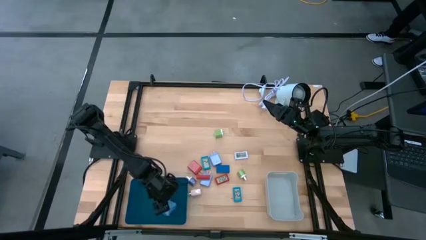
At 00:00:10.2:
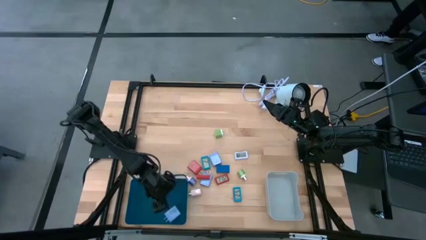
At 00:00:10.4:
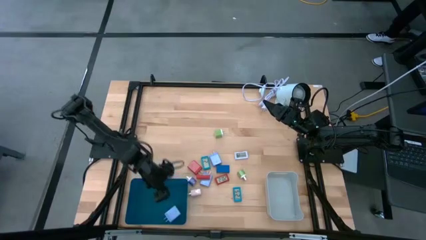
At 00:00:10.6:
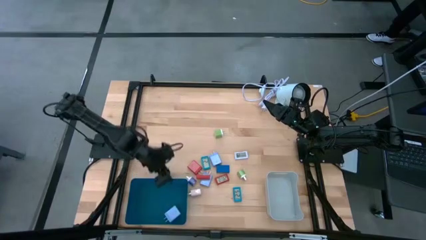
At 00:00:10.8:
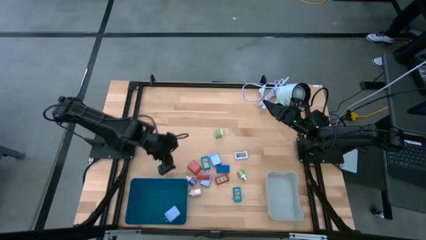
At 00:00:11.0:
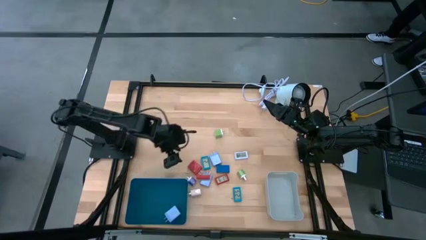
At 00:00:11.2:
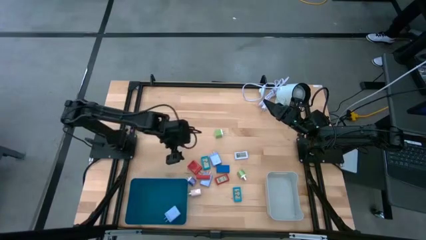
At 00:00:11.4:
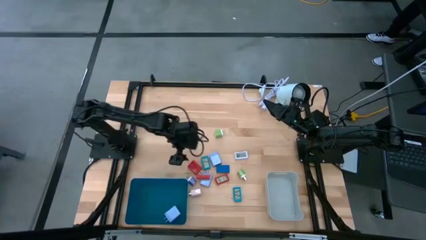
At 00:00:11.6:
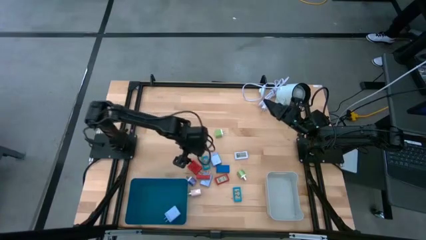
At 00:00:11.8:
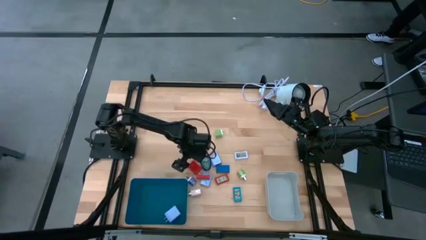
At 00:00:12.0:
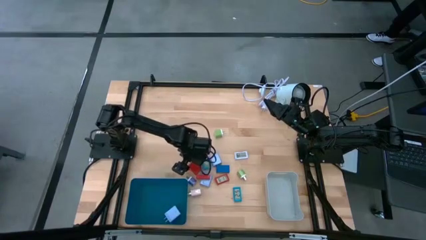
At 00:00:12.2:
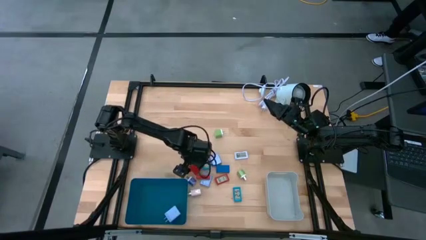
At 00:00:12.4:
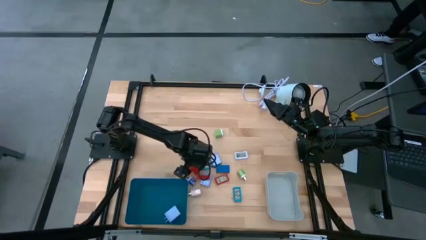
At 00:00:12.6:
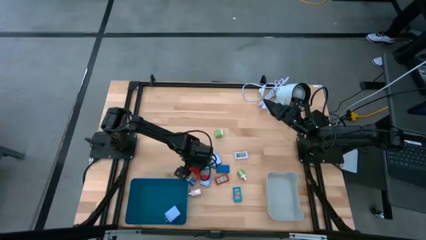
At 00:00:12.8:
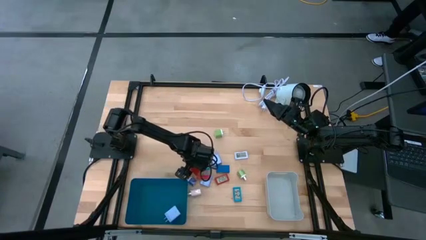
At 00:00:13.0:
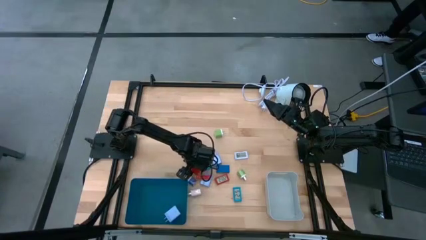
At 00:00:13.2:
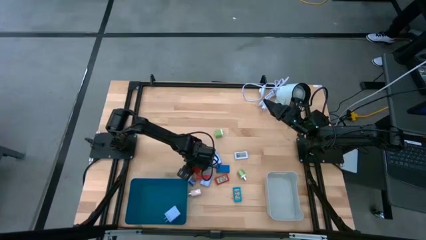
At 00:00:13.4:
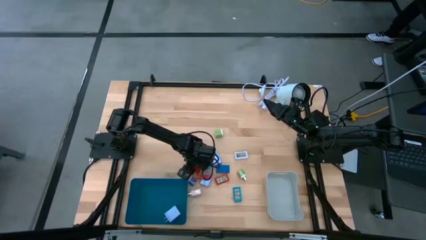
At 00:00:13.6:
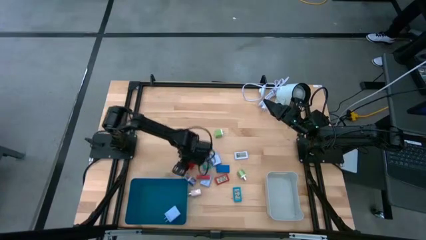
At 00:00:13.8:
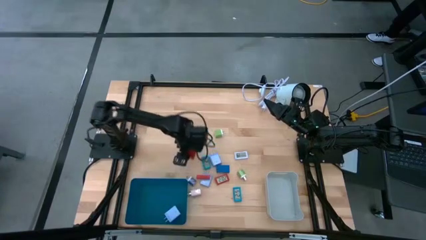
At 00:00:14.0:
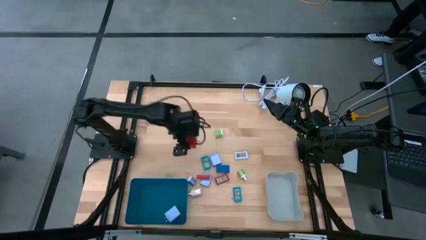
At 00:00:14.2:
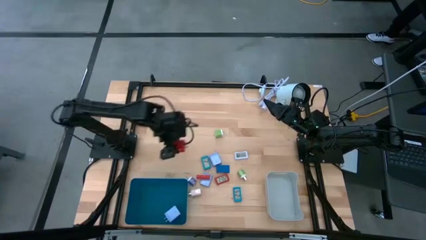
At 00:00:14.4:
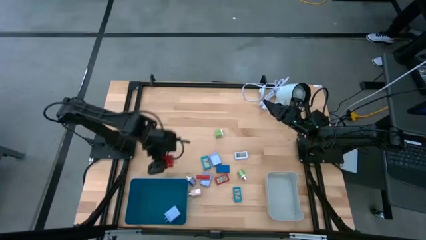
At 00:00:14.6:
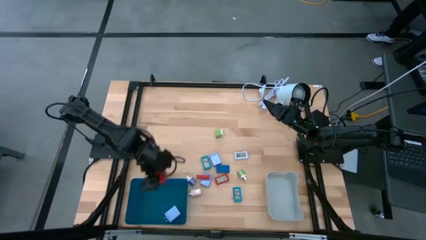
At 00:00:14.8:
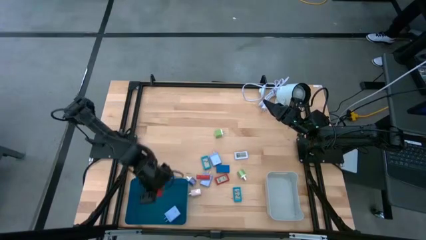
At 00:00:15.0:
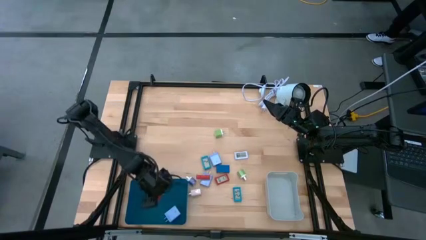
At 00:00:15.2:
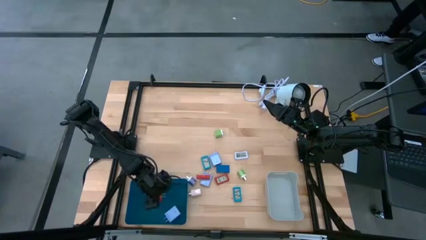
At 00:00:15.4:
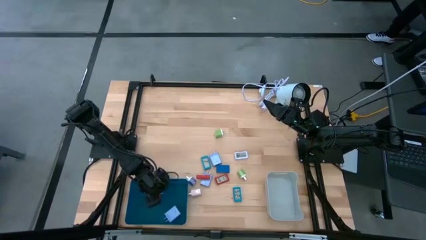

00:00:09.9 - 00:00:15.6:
Task: Pick & Place Office items
Put the red charger adapter into the blue bin

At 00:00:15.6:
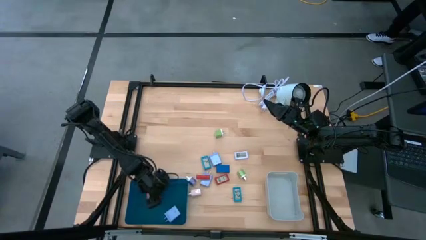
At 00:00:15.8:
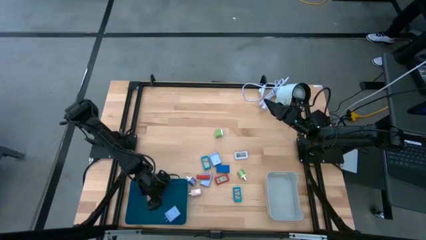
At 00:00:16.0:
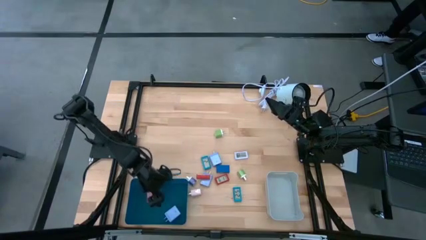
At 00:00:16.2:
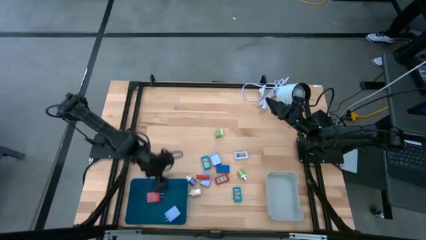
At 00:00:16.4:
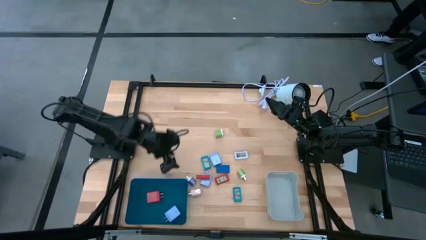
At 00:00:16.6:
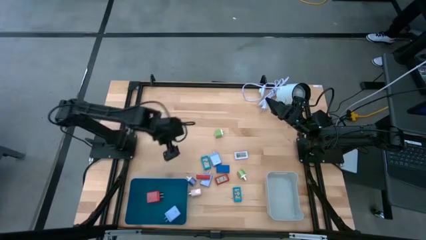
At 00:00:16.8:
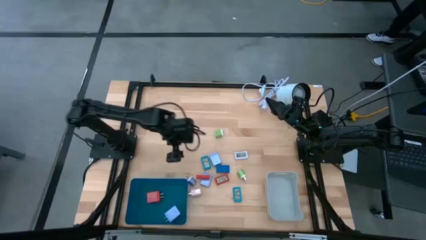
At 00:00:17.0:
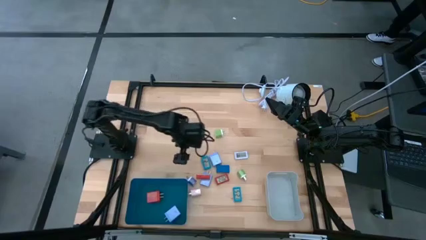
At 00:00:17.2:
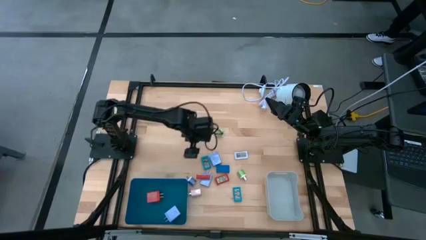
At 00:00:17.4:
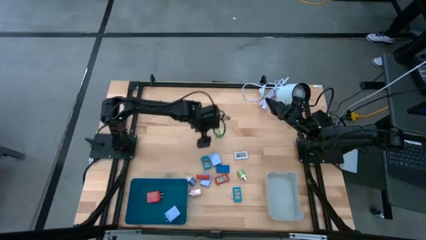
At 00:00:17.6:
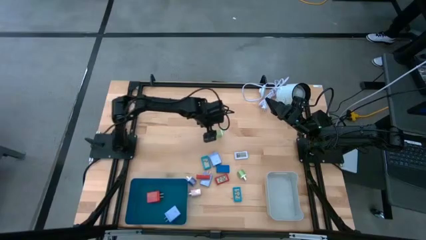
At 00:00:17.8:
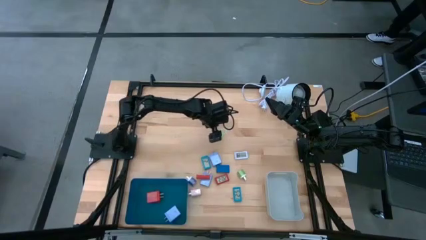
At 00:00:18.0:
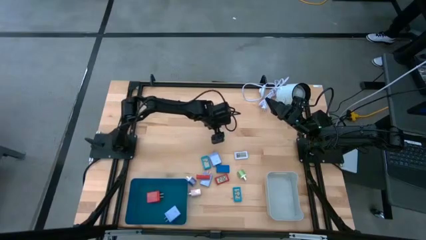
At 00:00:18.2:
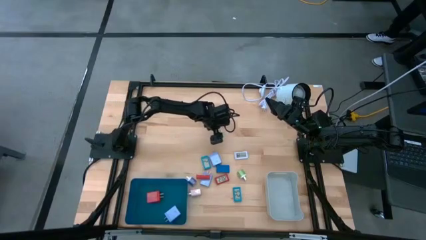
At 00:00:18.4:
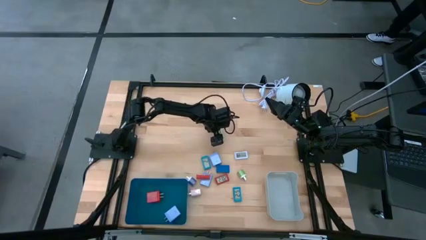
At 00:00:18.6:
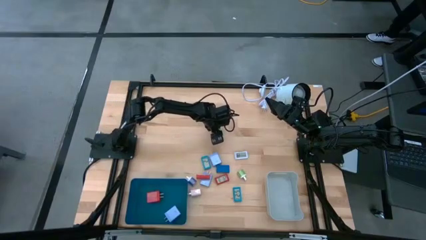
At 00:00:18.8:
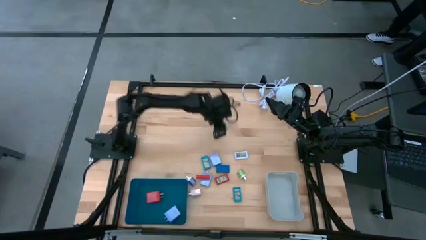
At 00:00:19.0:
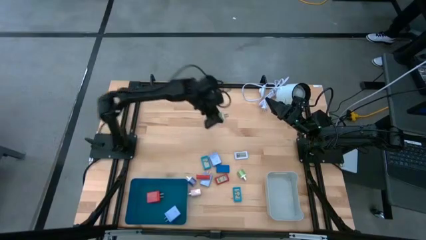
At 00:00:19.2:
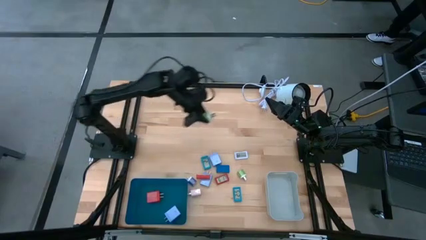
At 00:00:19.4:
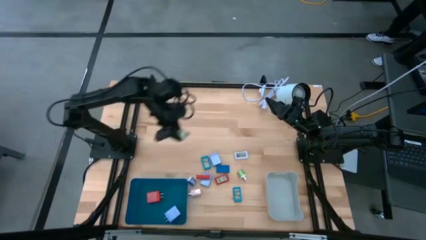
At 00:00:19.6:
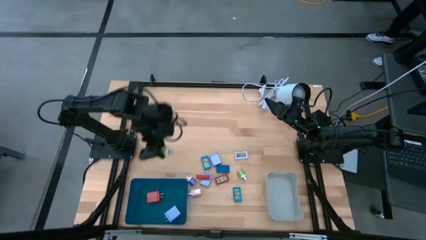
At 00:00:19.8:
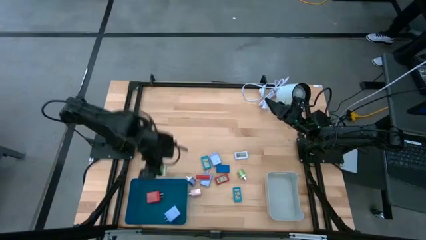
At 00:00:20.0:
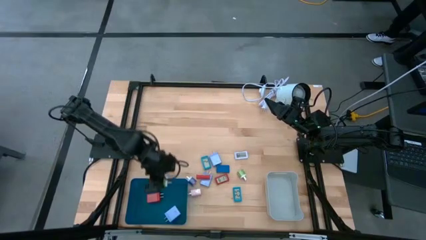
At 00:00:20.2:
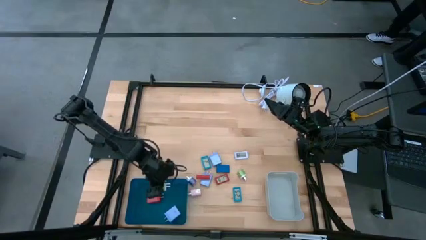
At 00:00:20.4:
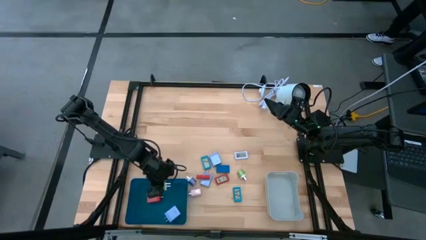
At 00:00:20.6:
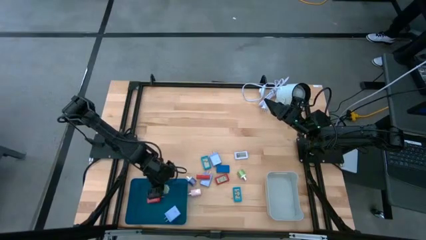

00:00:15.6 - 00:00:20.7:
Put the top green charger adapter into the blue bin

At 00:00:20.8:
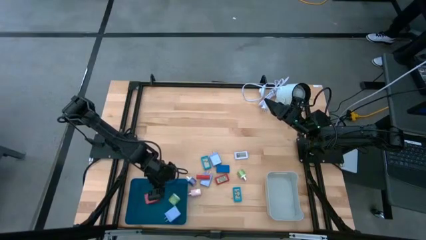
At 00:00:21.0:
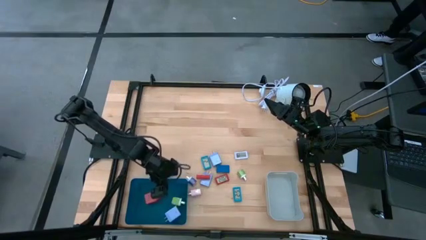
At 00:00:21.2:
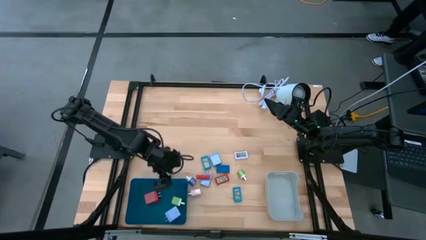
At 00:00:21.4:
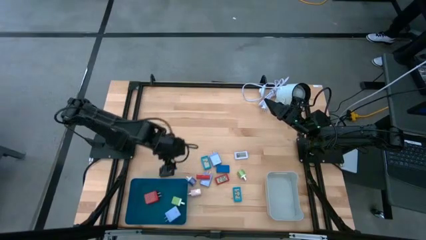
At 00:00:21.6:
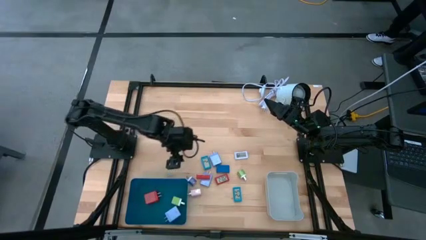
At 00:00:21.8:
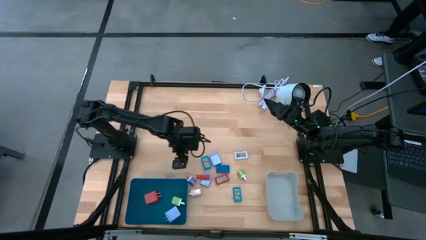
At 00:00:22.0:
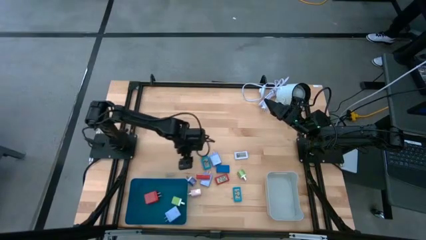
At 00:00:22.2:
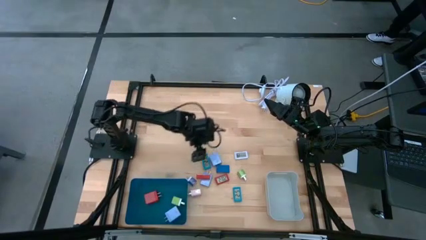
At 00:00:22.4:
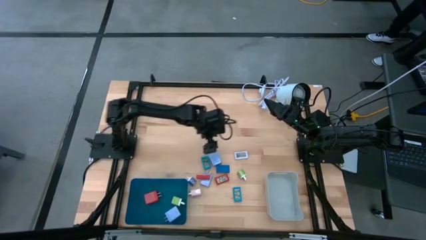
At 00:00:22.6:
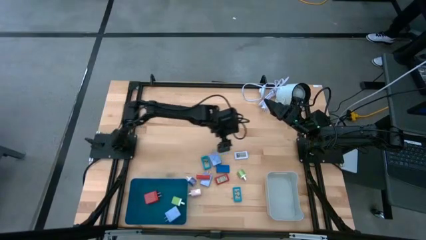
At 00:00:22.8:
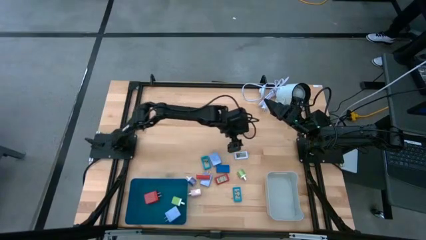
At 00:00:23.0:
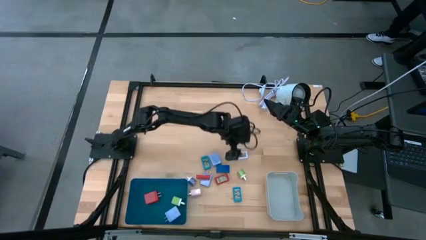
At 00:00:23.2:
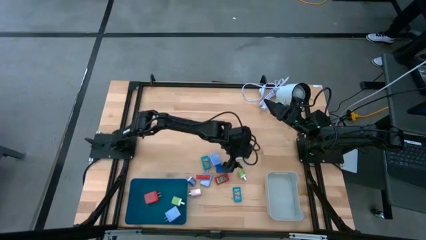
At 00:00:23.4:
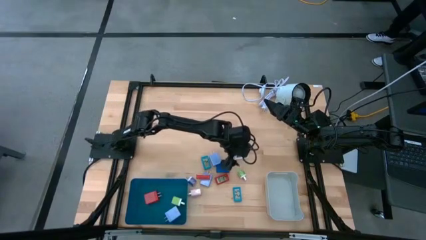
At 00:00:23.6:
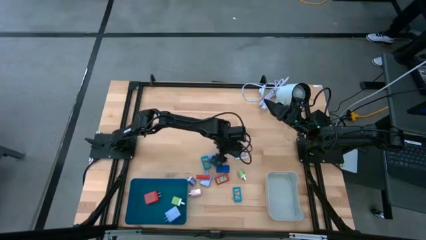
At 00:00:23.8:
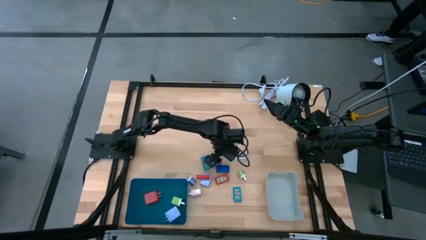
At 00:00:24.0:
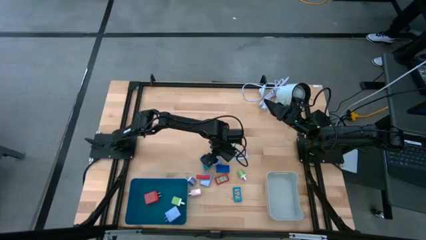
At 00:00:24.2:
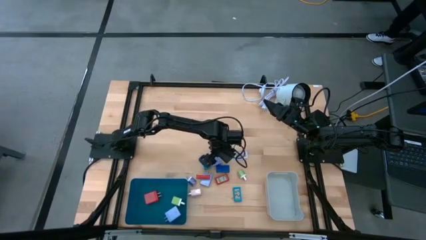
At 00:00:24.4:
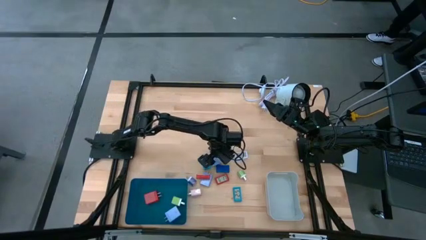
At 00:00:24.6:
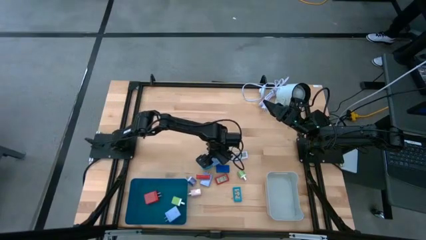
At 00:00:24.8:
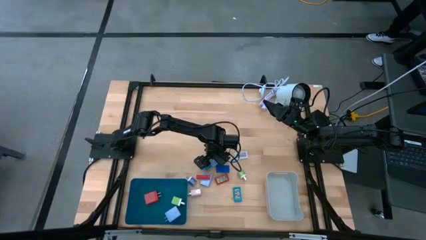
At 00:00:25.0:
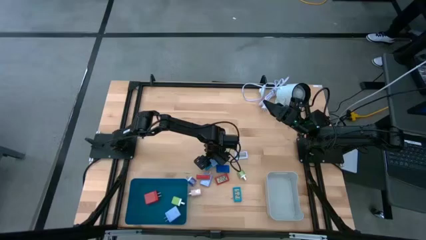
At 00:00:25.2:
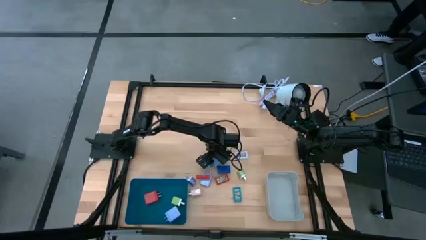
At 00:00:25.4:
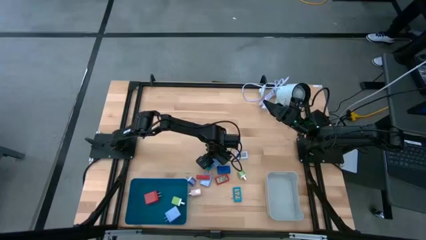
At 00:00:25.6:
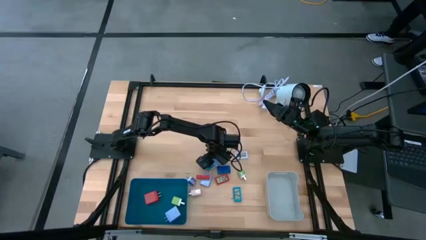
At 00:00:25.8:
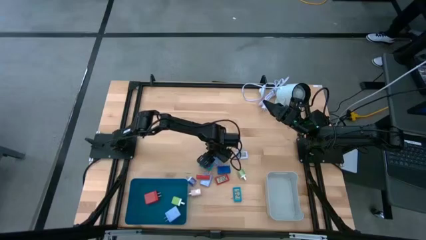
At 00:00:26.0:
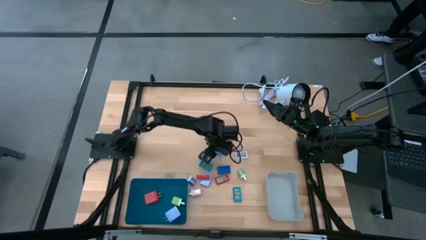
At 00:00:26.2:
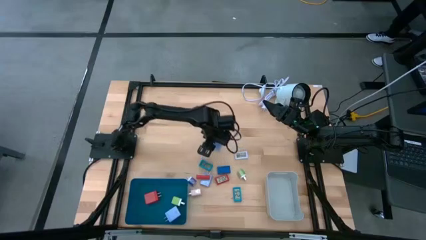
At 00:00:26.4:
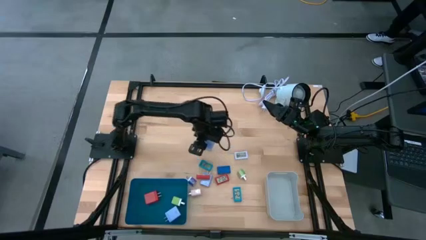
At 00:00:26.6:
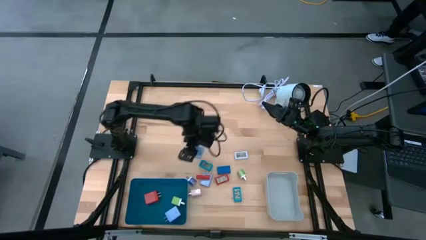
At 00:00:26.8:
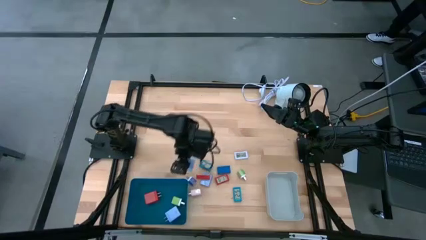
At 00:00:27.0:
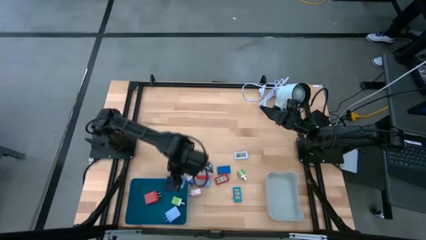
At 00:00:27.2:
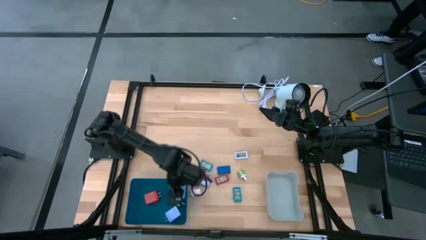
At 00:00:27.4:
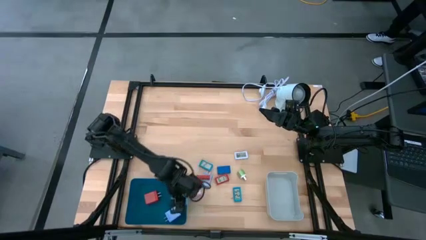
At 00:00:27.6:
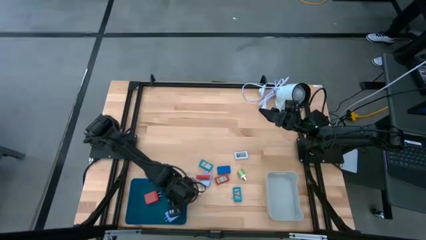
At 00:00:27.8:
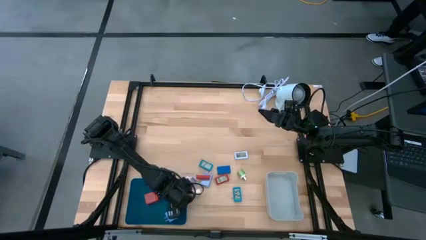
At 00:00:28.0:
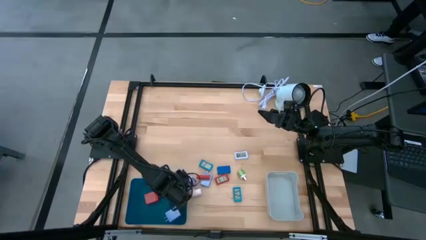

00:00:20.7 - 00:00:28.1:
Put the top purple charger adapter into the blue bin
